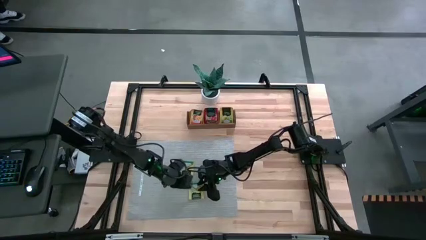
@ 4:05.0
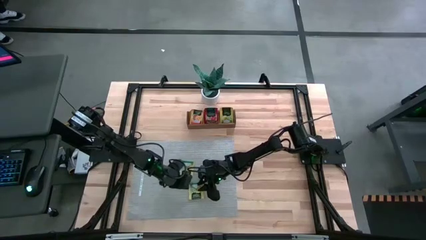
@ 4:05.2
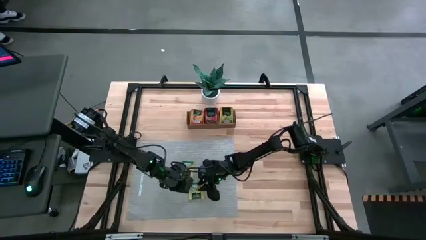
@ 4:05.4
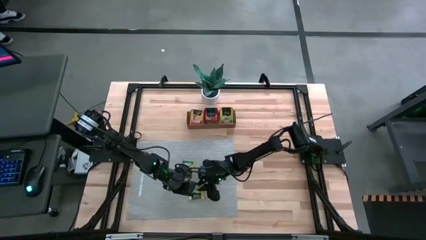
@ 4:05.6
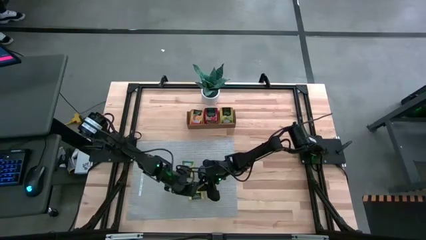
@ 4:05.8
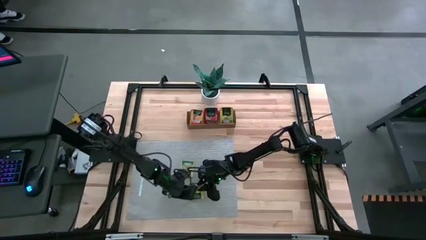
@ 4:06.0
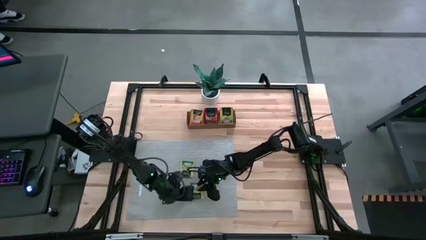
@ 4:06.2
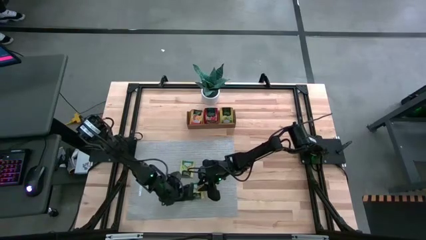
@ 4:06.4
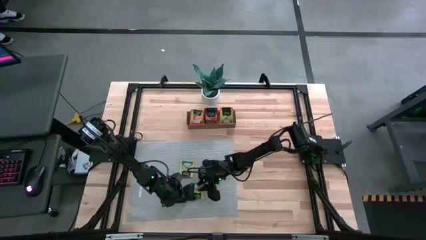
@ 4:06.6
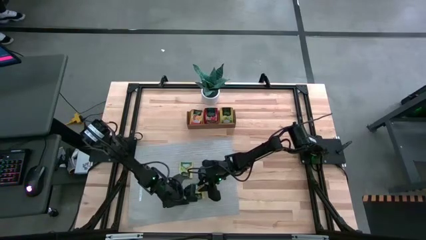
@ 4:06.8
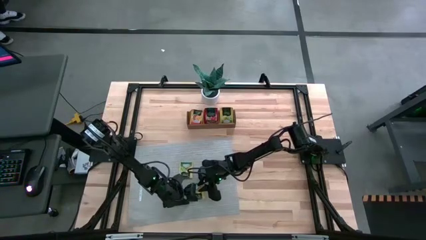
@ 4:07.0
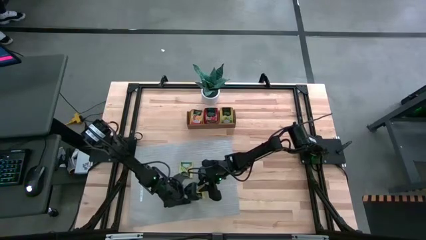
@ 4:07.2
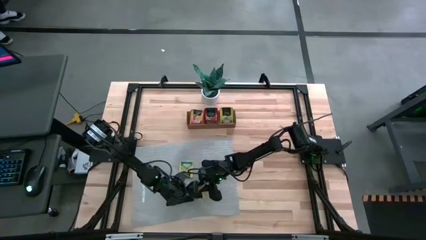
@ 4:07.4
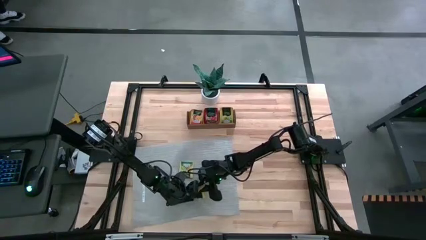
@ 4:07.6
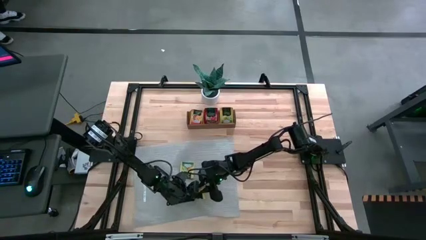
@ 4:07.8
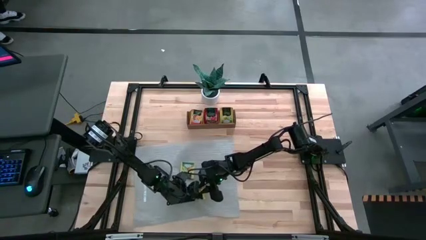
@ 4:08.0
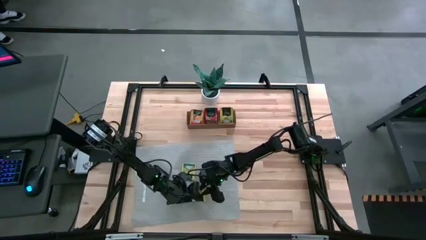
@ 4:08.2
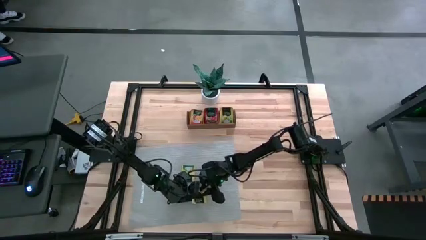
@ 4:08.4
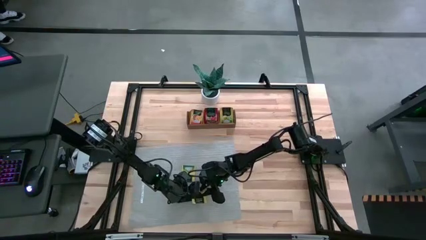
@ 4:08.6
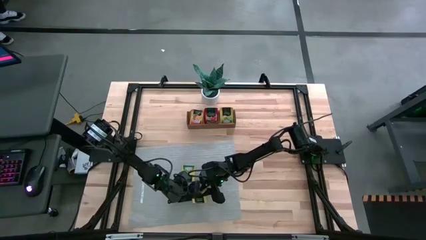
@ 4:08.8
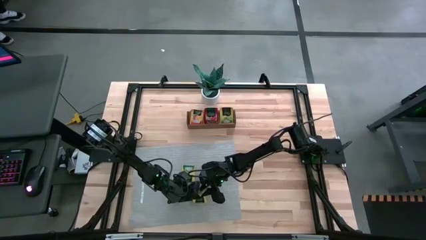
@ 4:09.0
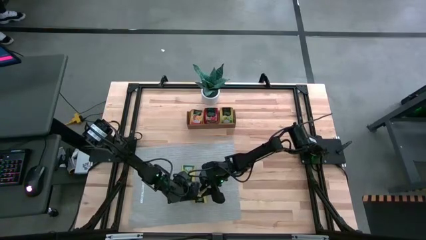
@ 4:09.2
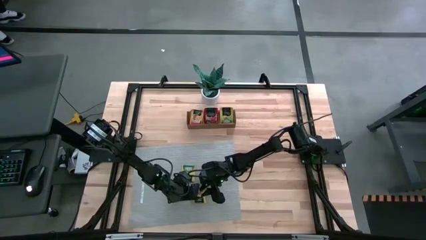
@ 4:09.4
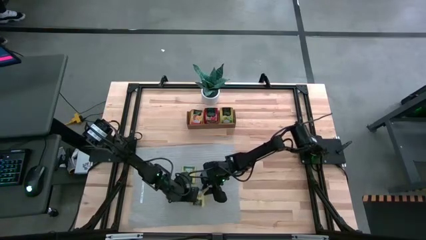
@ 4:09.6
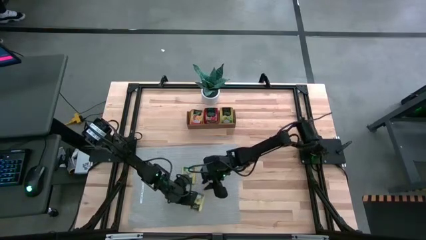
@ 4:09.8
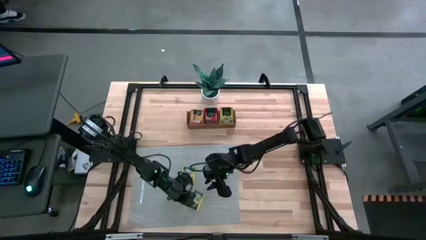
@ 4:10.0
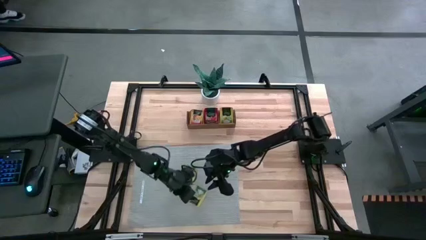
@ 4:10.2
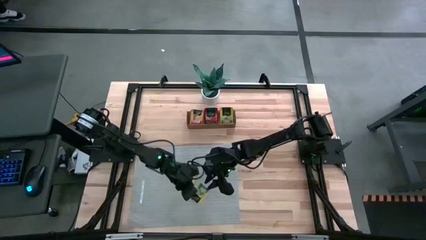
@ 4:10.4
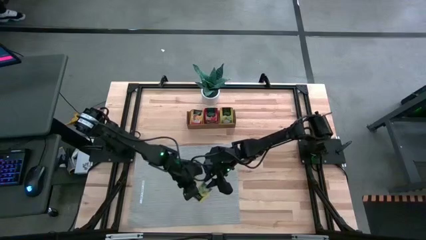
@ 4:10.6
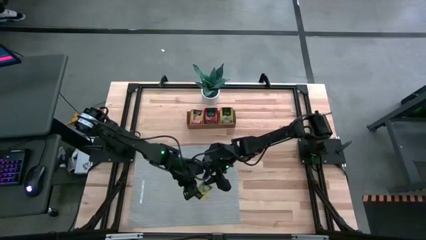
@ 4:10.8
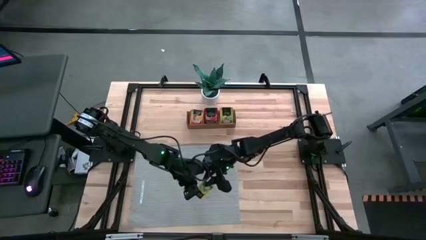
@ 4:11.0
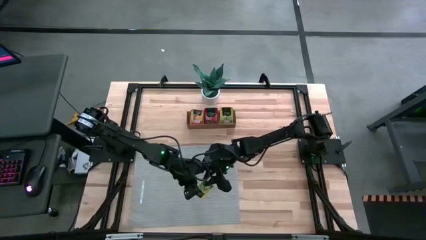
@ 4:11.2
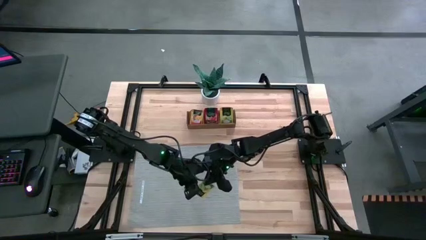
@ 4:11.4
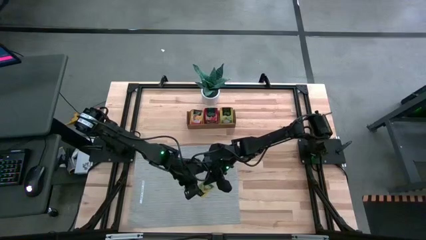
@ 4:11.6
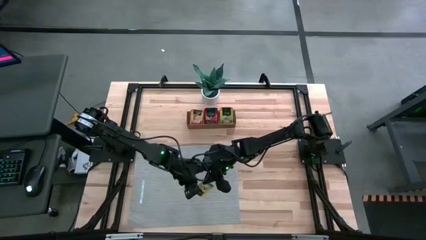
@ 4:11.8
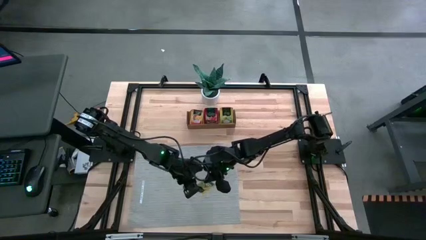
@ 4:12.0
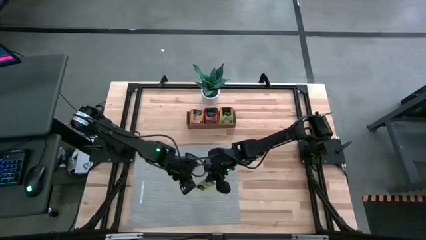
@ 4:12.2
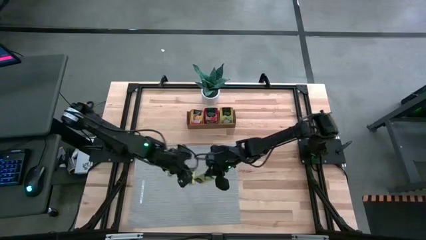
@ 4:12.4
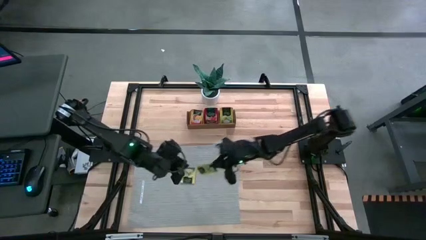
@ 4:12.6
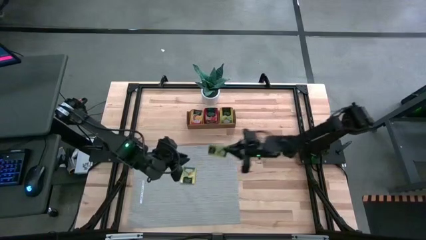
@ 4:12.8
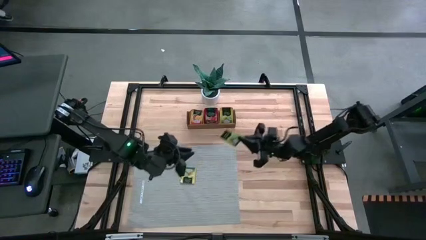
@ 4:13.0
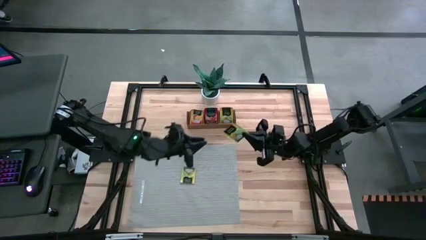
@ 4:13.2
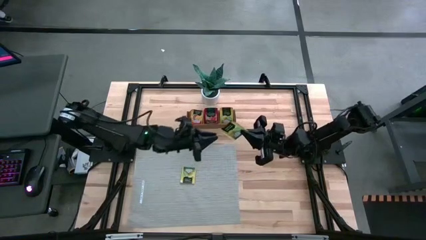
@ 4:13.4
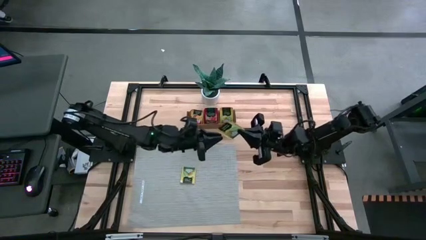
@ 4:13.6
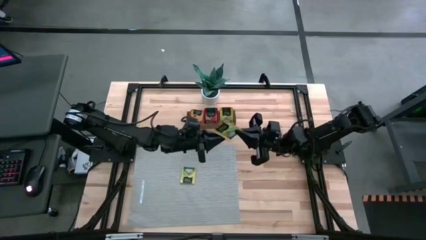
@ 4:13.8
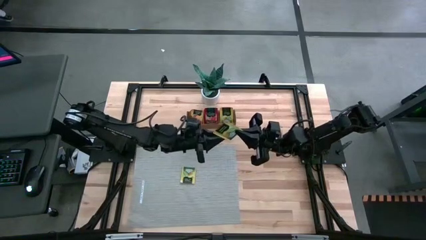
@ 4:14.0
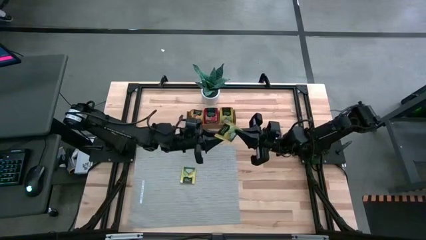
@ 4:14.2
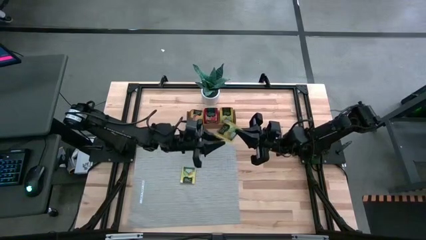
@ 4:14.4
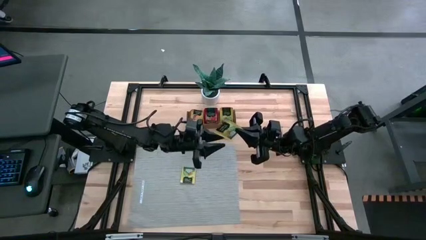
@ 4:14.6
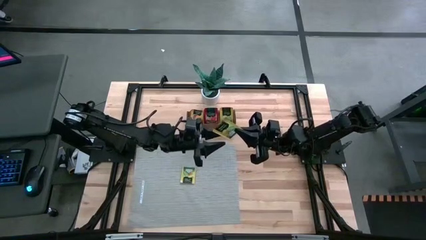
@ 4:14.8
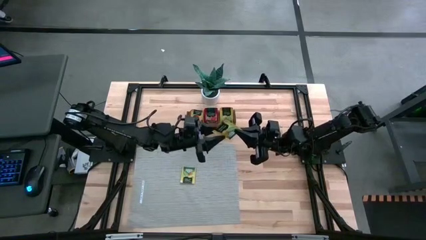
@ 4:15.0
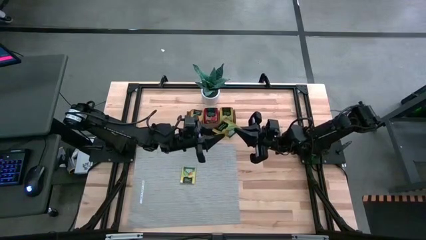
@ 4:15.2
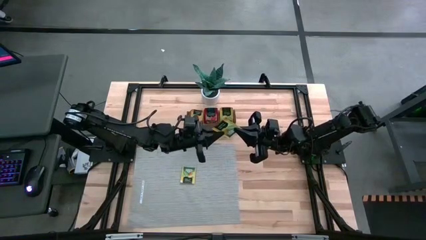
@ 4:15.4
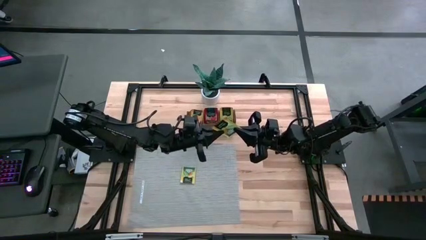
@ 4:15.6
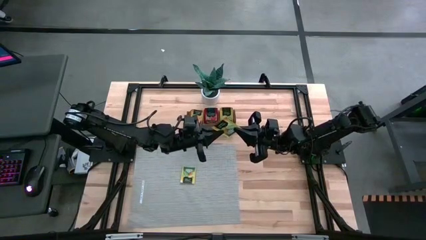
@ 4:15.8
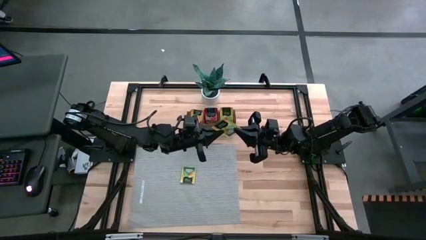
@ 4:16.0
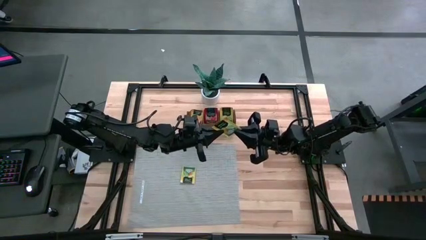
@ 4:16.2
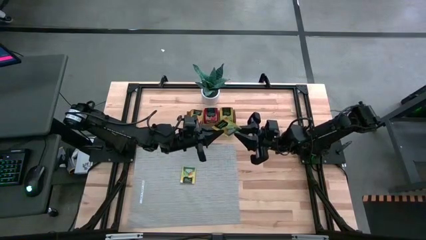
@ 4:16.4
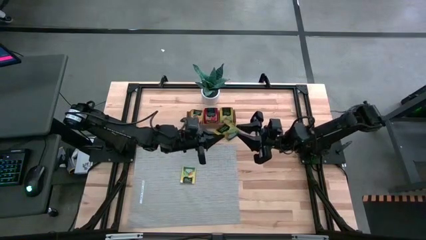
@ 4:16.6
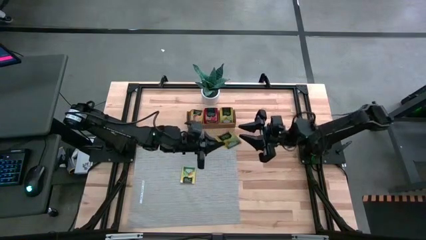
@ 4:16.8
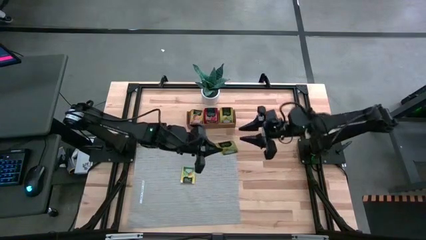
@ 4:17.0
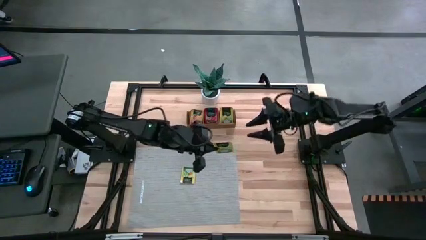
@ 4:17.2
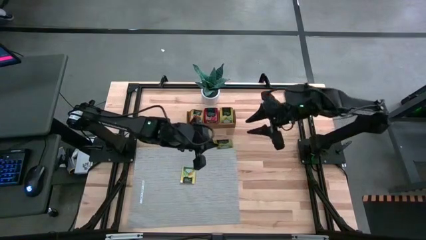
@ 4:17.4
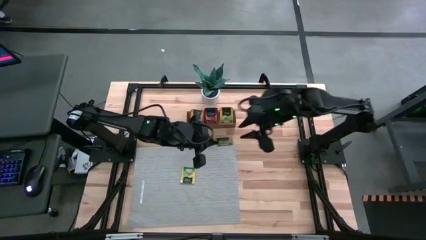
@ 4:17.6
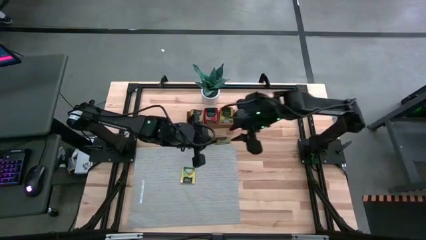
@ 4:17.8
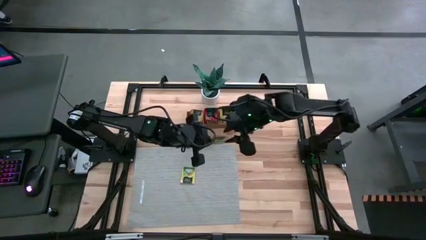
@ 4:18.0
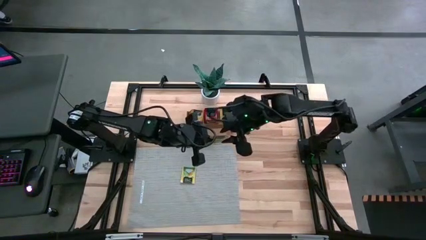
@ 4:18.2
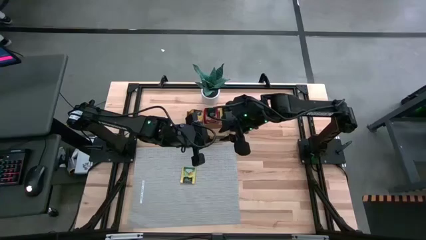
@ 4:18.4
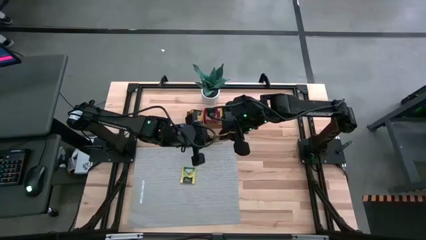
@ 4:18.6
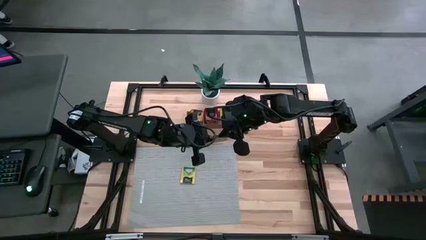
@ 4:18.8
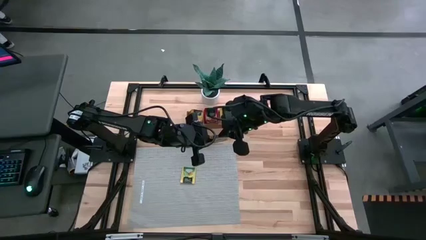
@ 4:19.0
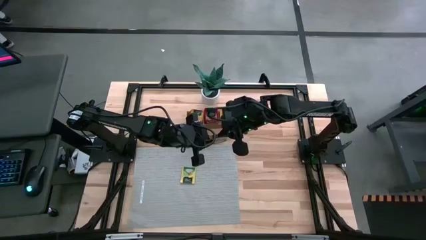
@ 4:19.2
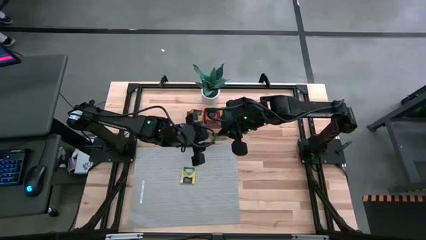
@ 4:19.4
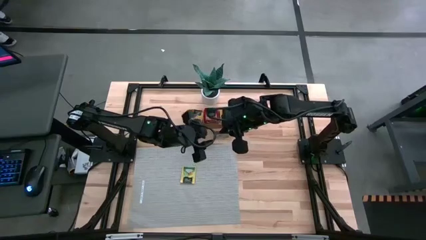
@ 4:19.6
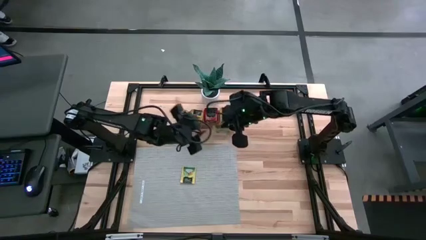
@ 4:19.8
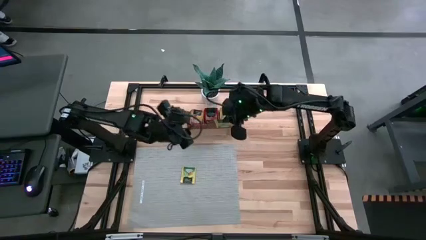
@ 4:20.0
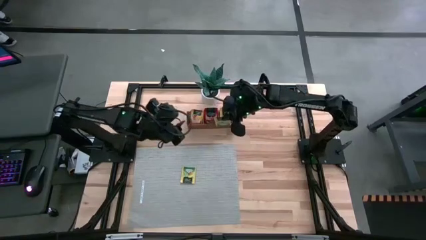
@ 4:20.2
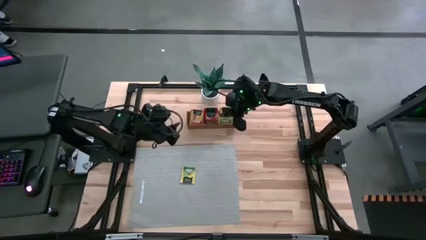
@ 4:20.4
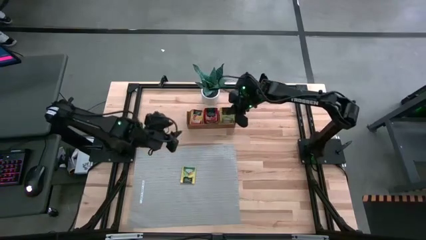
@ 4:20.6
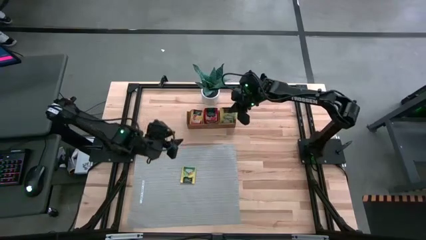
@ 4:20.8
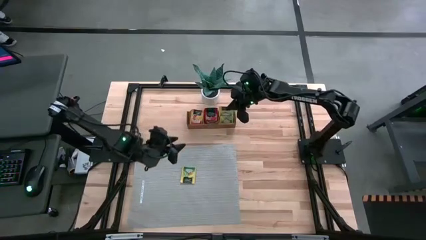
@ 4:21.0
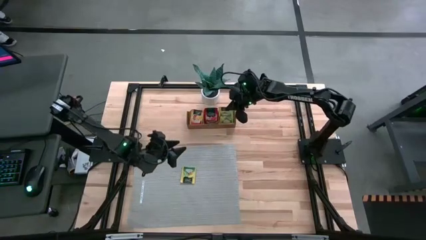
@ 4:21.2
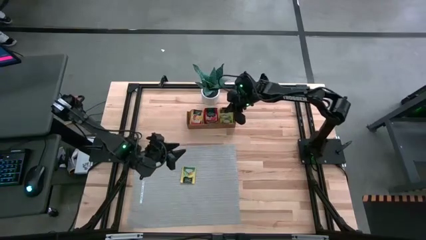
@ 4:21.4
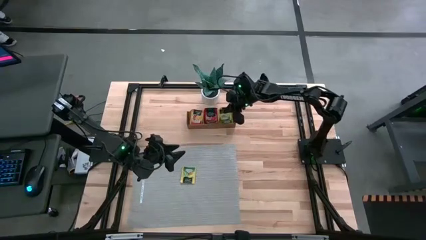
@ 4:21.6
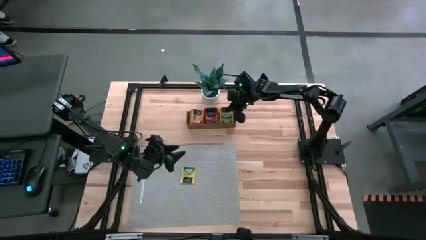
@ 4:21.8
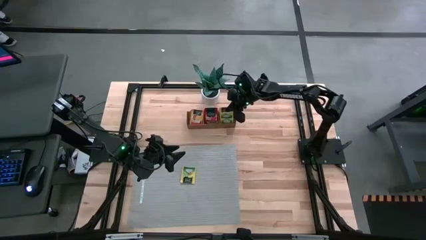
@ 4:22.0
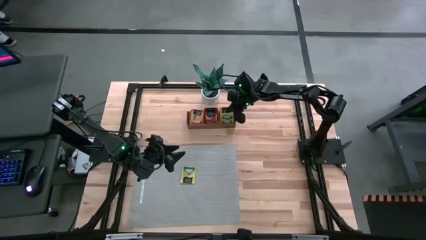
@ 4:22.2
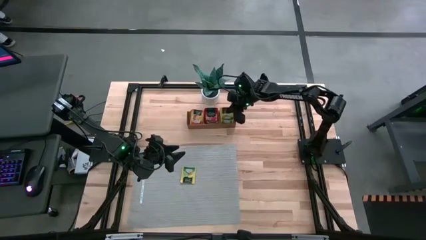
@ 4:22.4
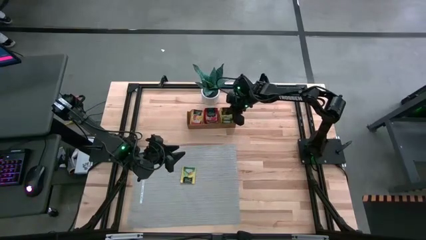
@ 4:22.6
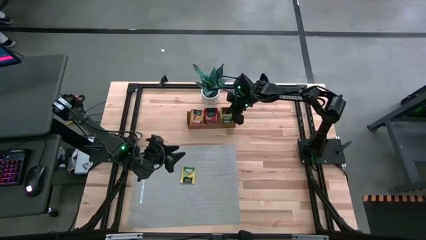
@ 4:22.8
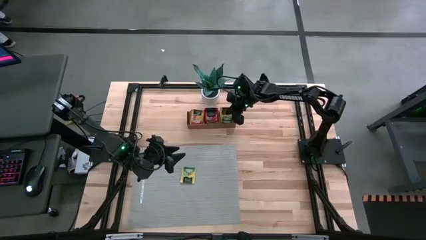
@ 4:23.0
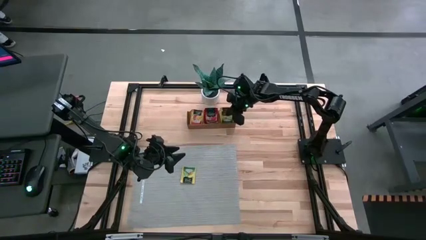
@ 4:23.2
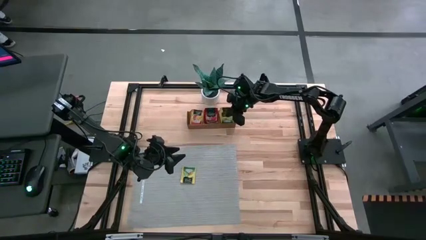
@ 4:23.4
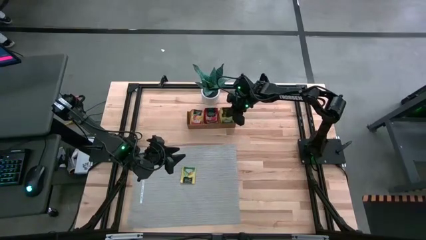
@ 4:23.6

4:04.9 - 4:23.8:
Task: Pick & Place Tea
Put the yellow tea bag into the right section of the wooden organizer
